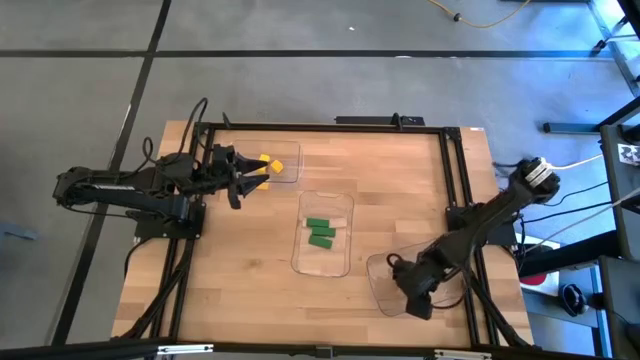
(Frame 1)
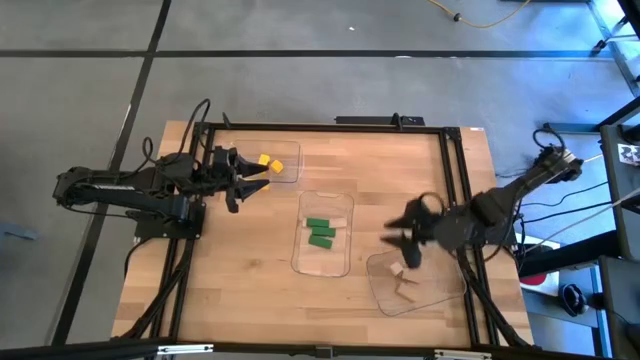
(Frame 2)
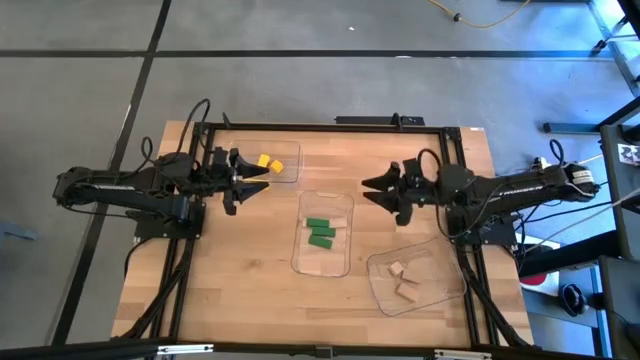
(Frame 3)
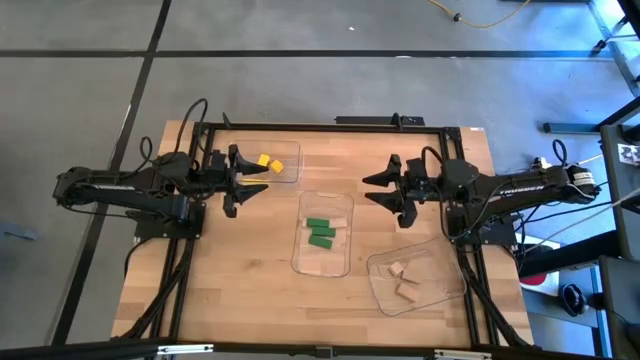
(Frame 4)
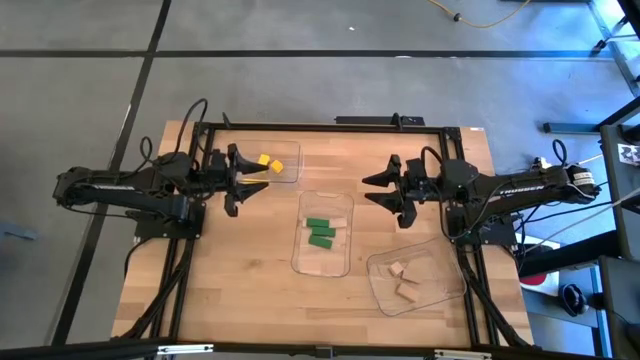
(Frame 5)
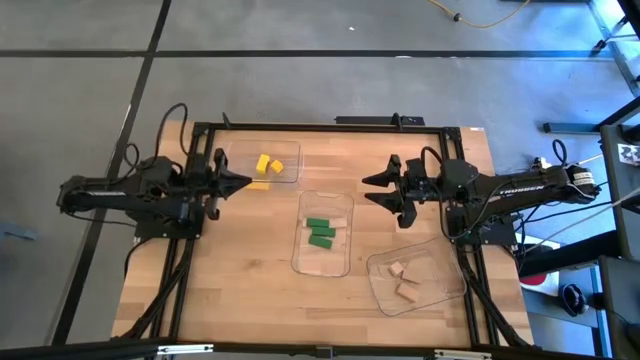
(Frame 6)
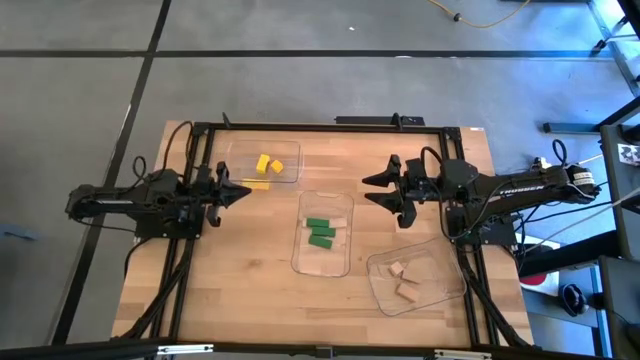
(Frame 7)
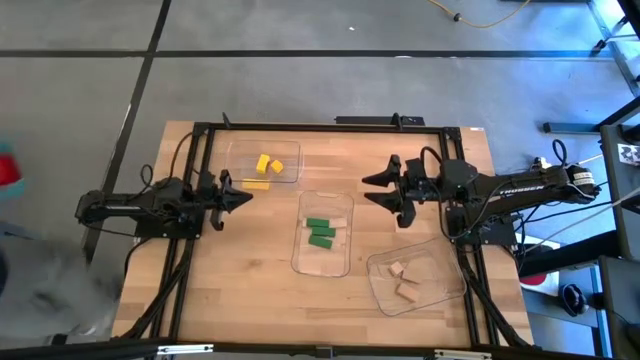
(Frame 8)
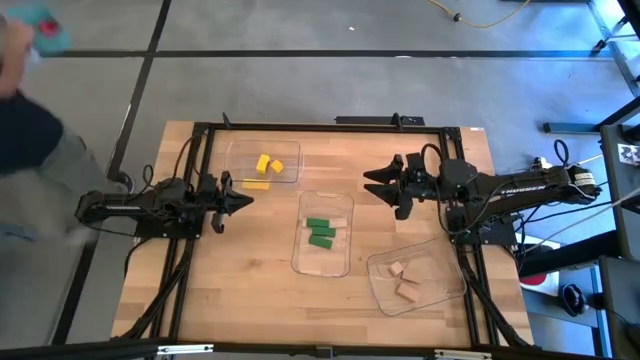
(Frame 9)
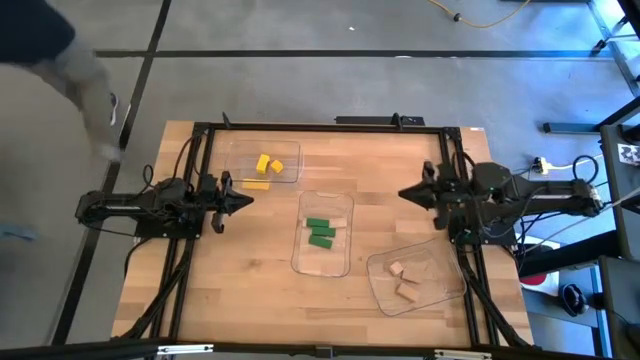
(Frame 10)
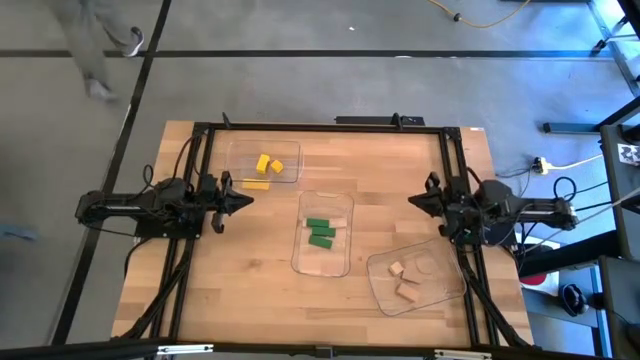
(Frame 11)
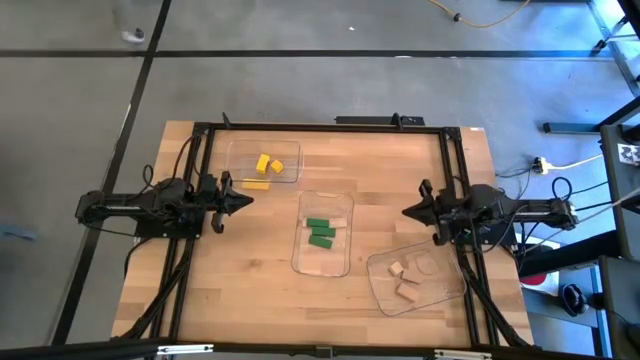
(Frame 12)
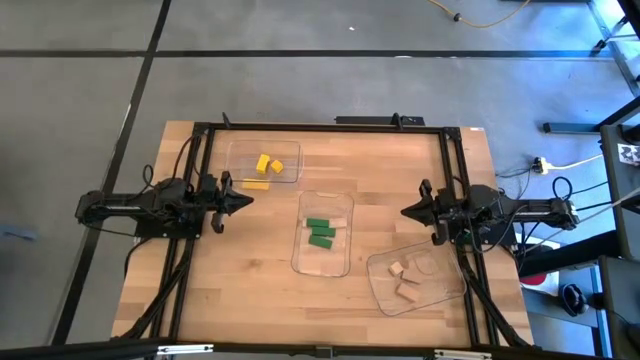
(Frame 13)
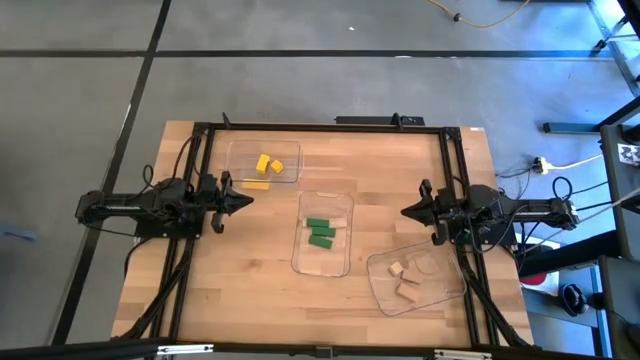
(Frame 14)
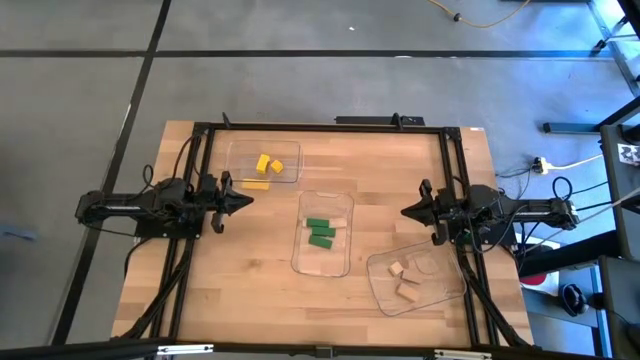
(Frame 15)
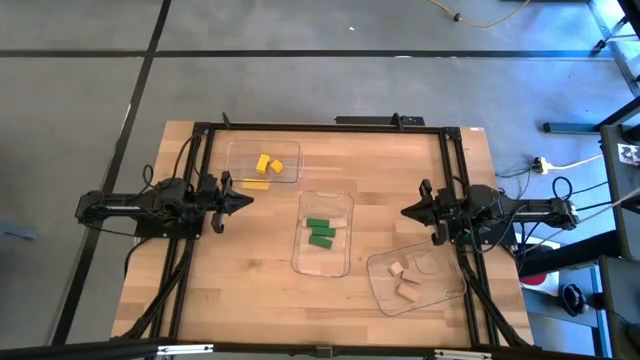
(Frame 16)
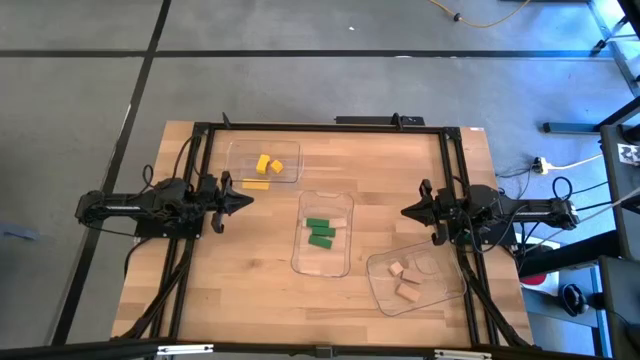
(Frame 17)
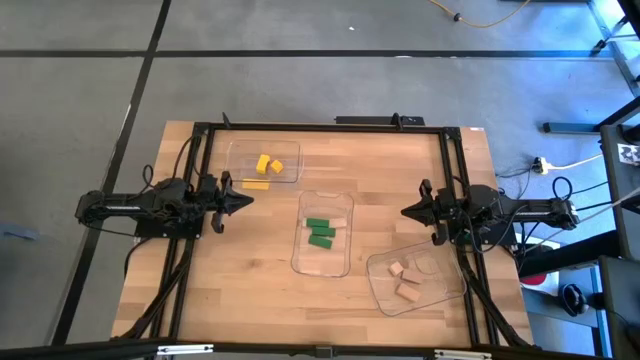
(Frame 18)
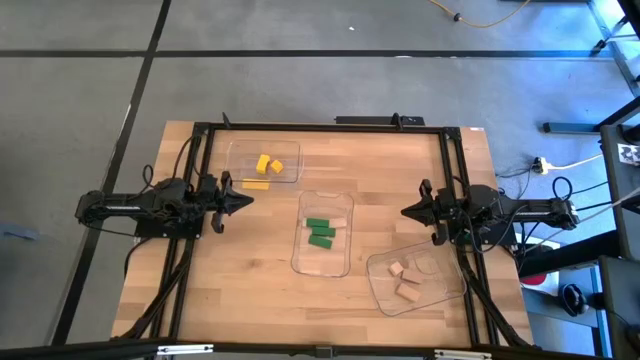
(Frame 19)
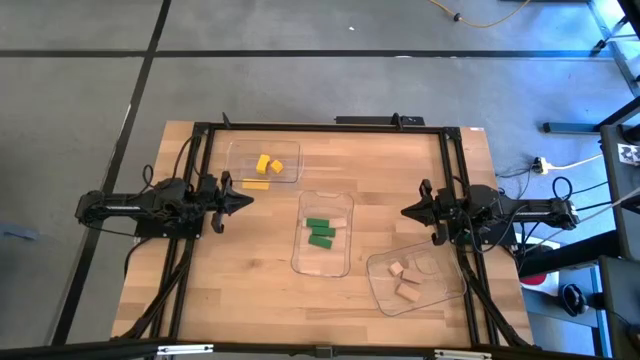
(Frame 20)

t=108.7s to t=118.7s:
Task: Sort & place blocks by color
Return to Home Position

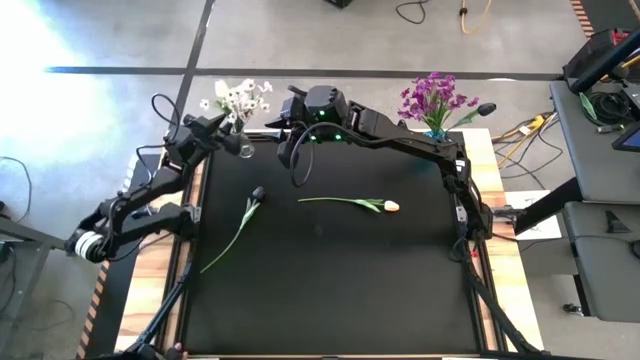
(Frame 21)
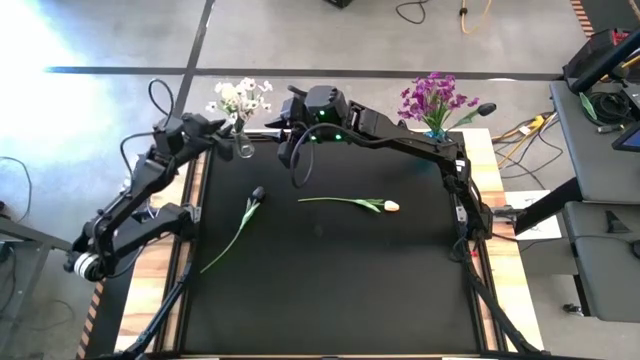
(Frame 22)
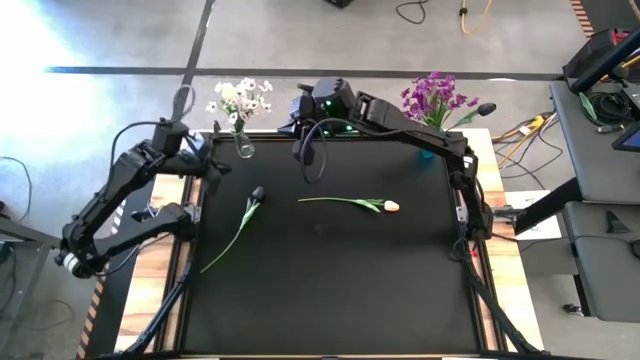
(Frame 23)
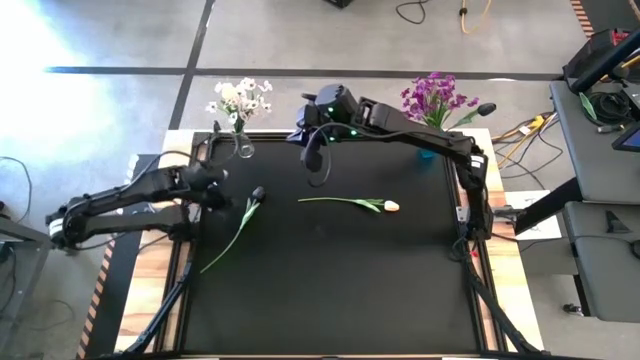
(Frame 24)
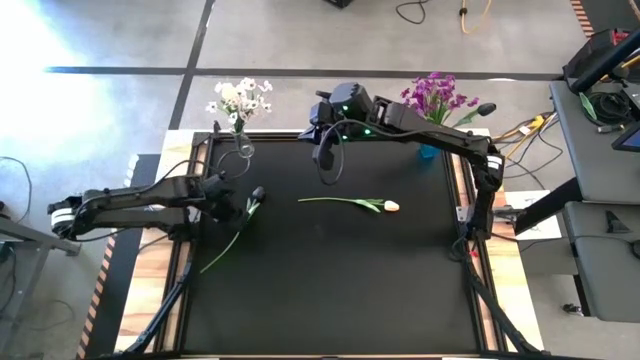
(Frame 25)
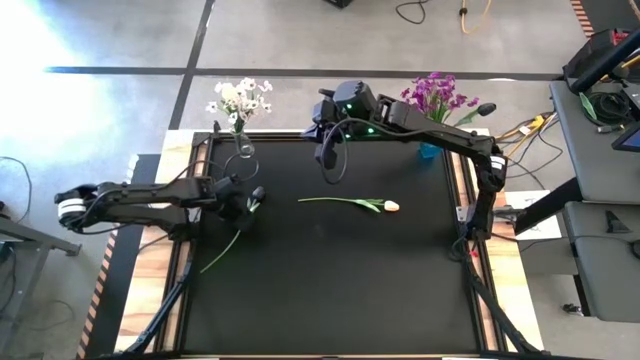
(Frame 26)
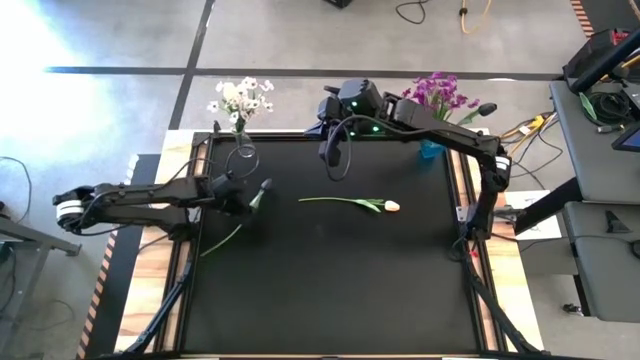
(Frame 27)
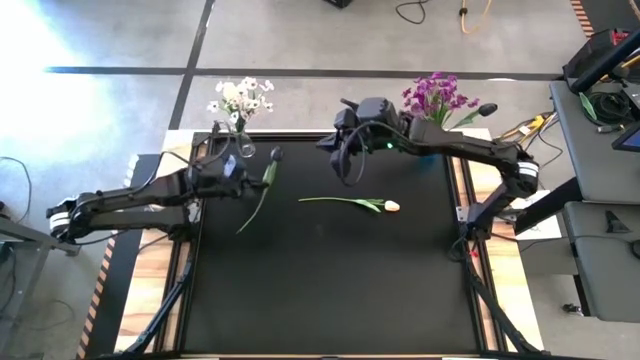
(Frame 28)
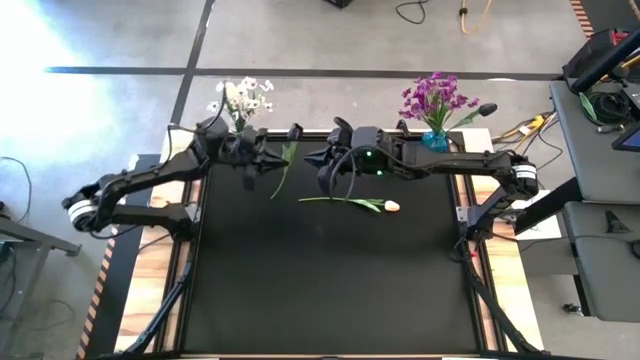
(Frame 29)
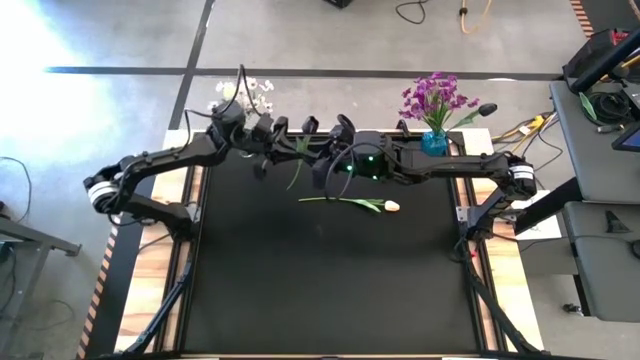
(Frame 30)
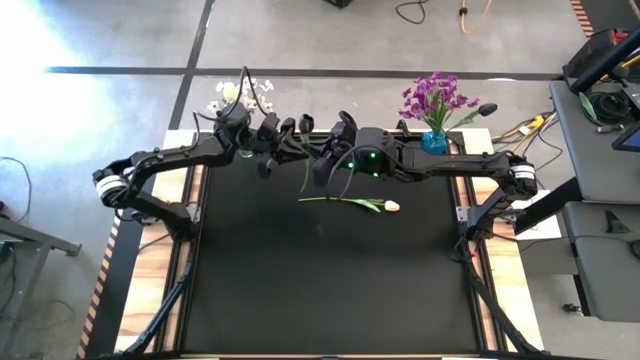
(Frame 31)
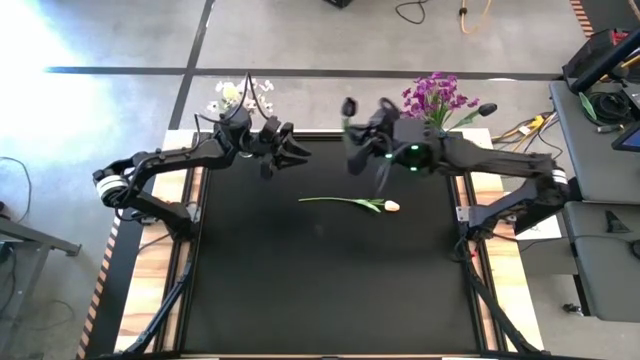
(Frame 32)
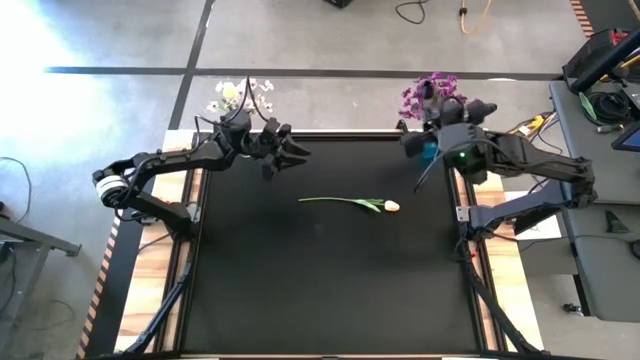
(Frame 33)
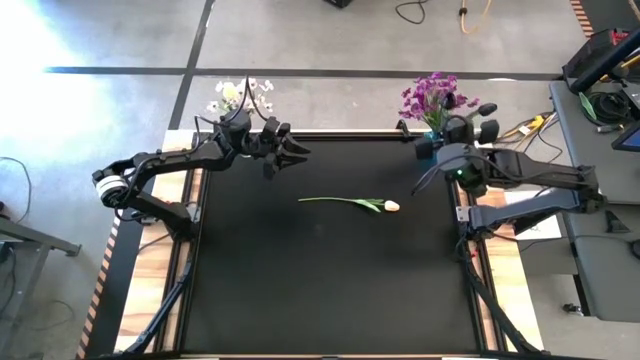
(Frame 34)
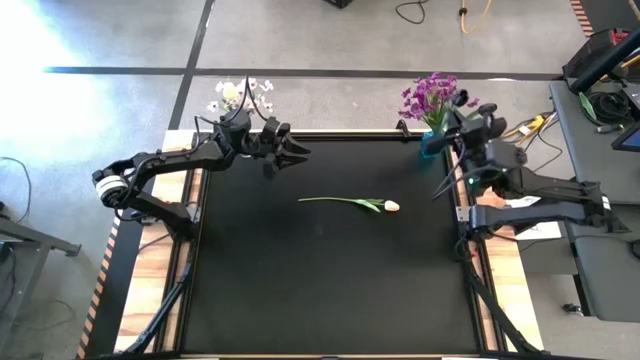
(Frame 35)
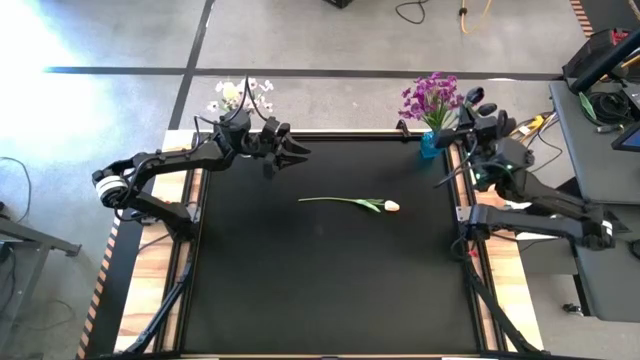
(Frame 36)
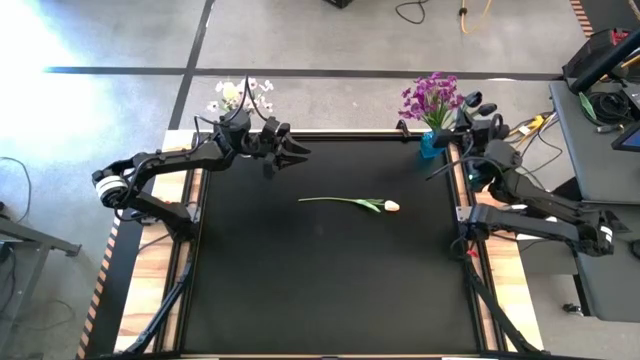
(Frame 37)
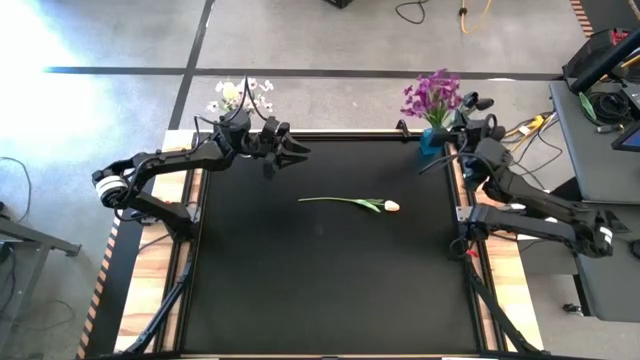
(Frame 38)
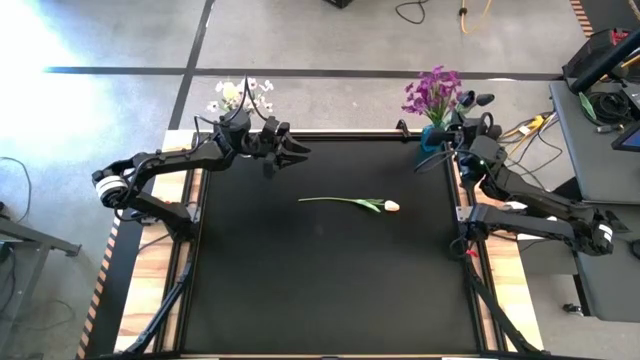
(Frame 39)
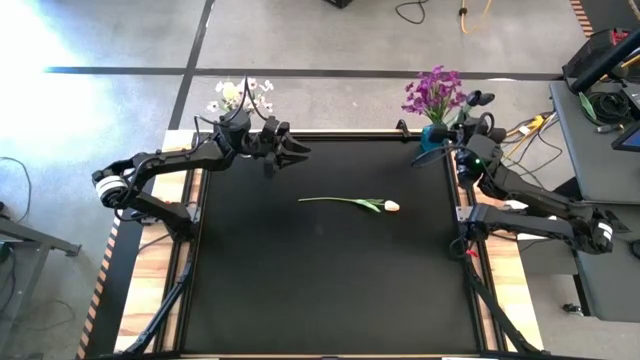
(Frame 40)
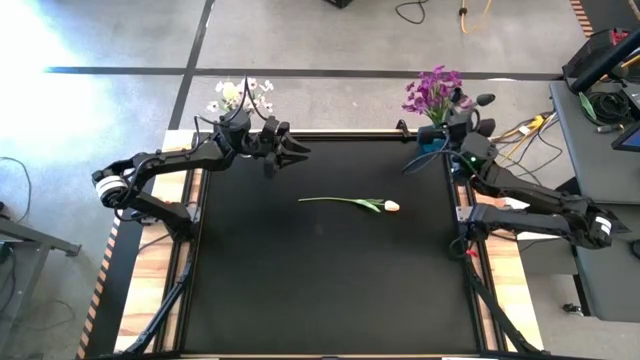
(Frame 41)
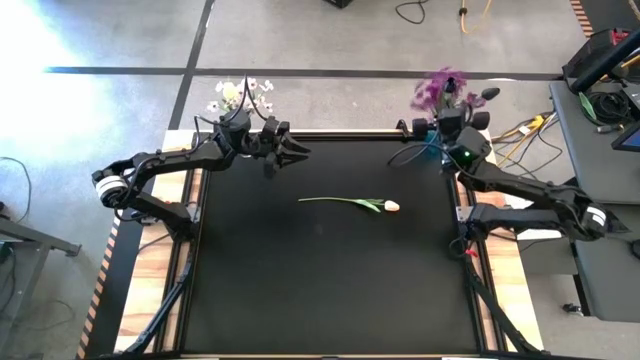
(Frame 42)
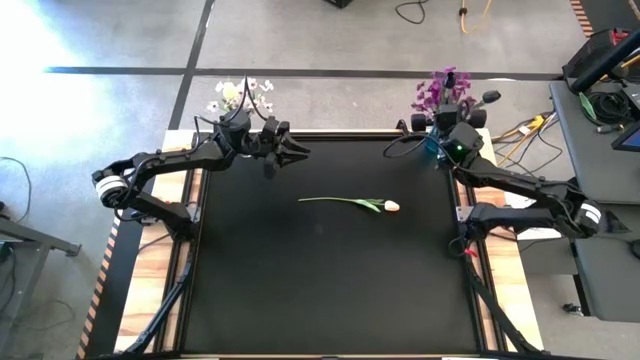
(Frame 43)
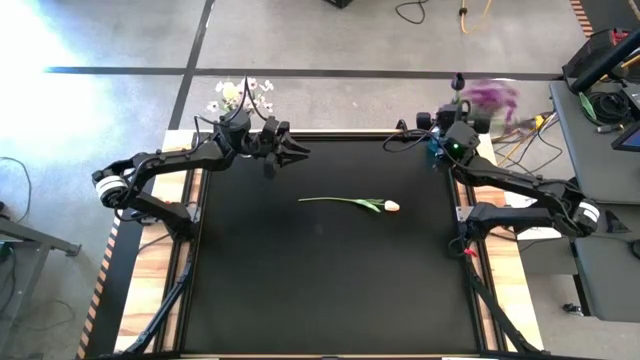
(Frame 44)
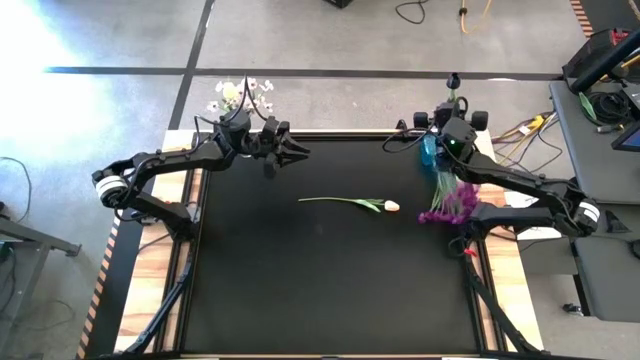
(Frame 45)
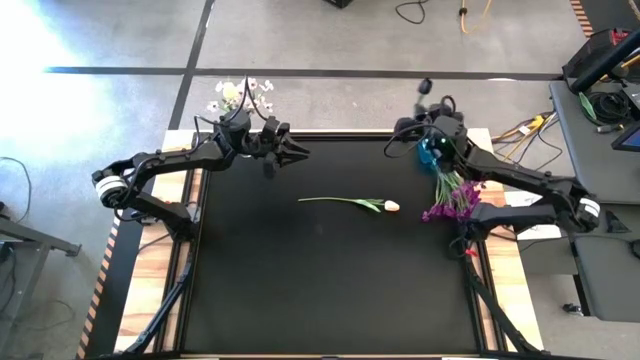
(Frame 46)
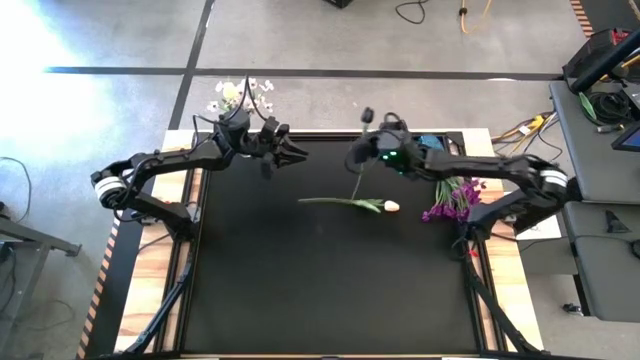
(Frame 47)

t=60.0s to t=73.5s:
Task: Sort flowers into vase by color
Put the black flower into the blue vase
